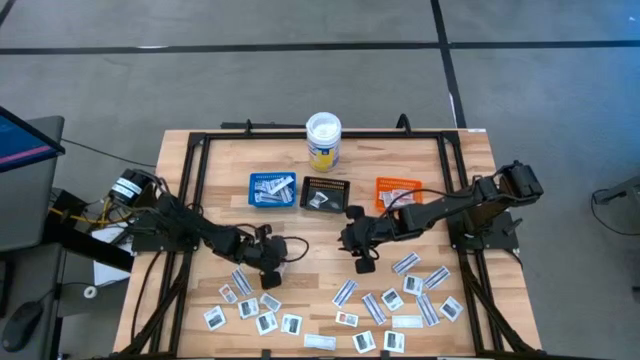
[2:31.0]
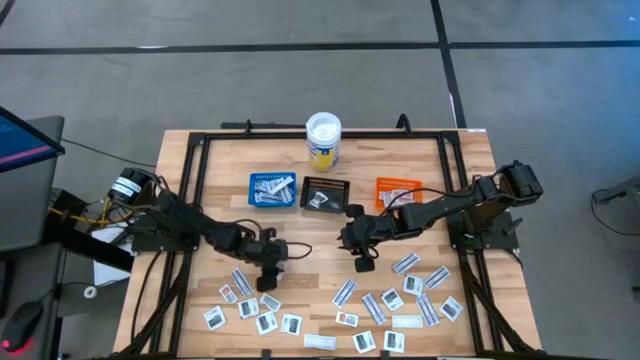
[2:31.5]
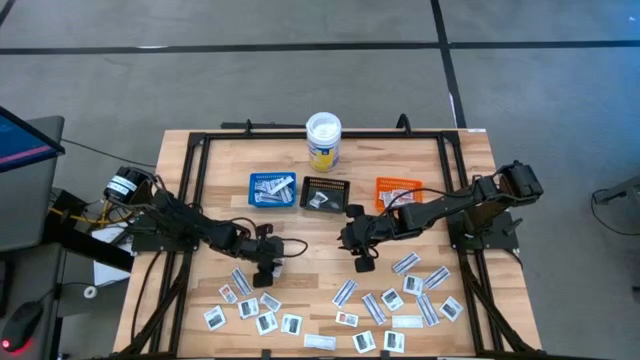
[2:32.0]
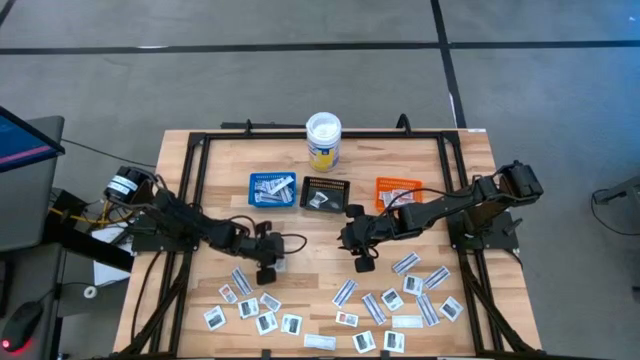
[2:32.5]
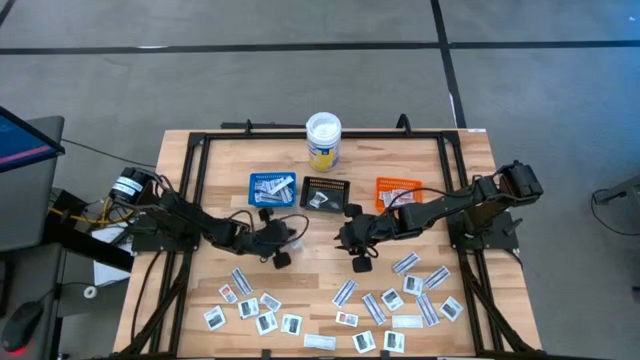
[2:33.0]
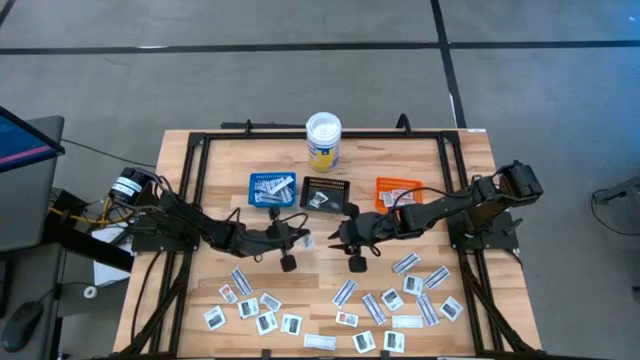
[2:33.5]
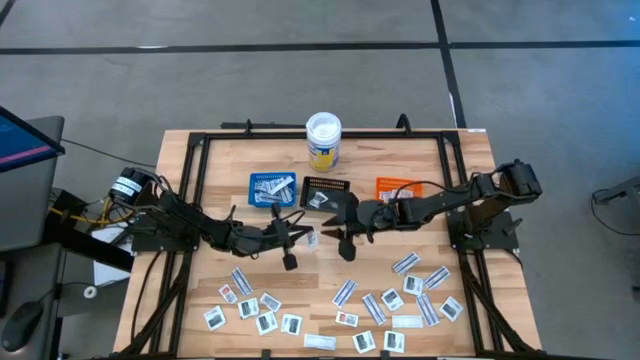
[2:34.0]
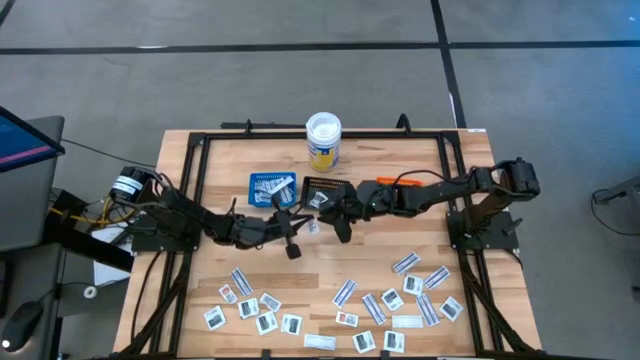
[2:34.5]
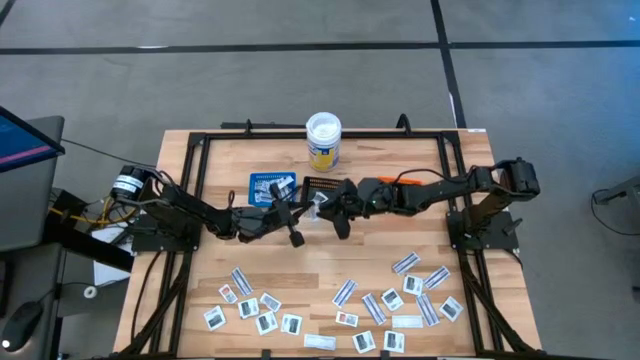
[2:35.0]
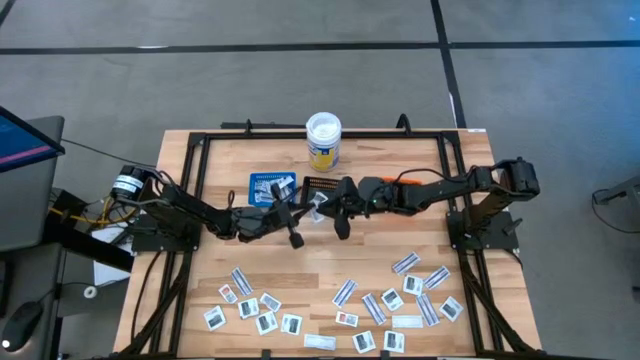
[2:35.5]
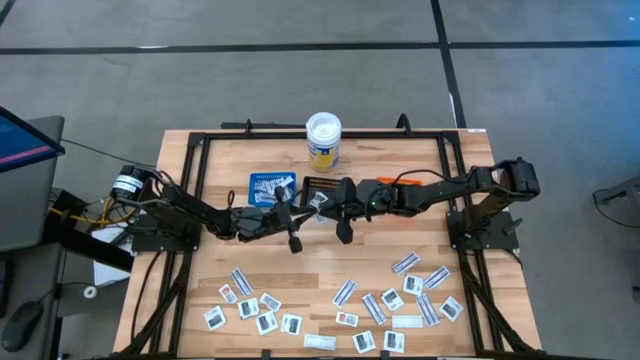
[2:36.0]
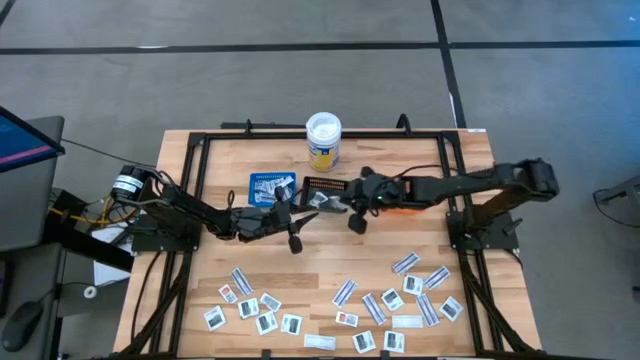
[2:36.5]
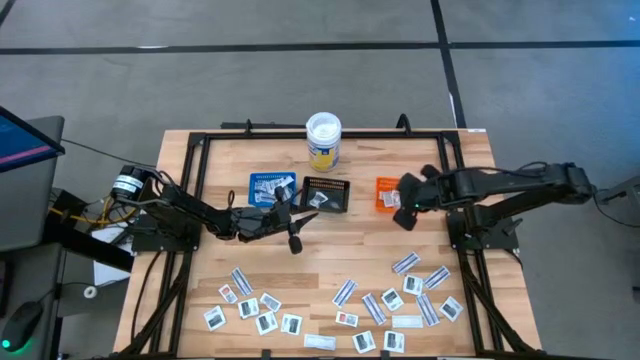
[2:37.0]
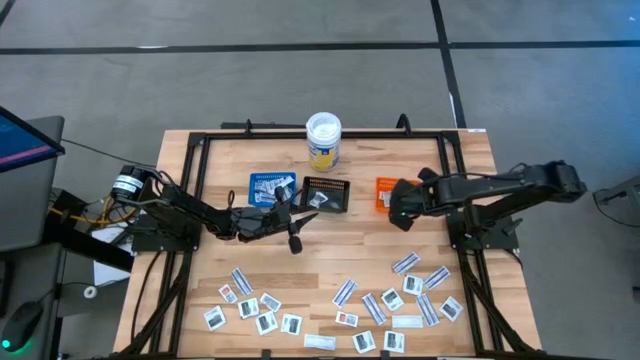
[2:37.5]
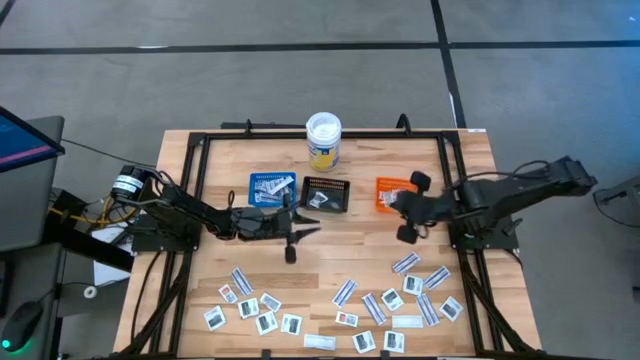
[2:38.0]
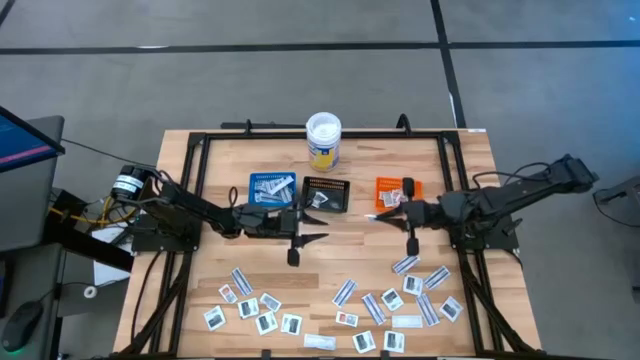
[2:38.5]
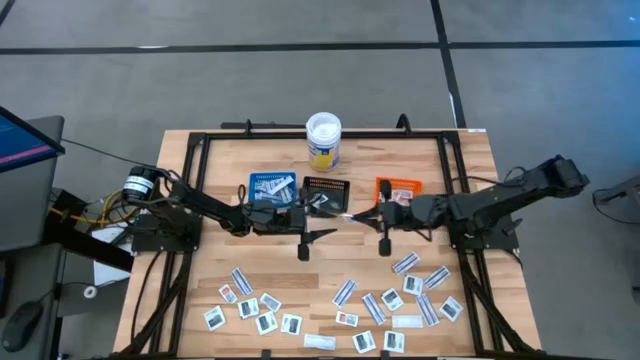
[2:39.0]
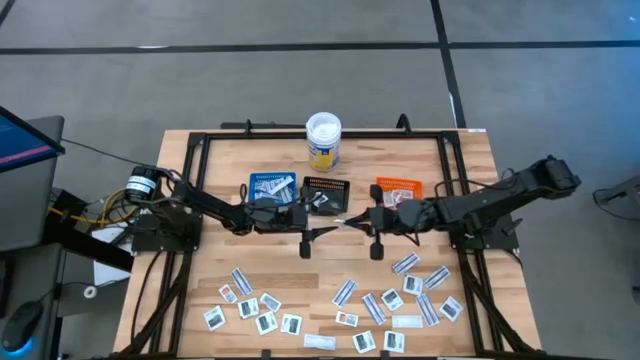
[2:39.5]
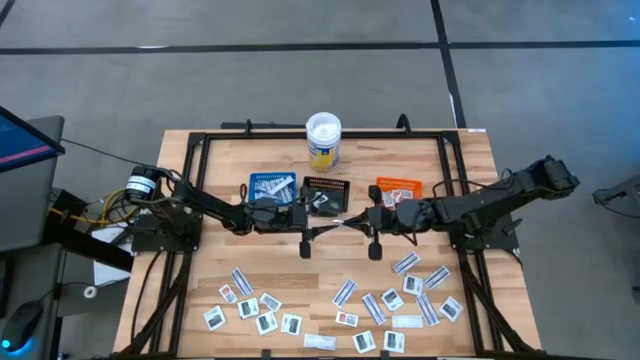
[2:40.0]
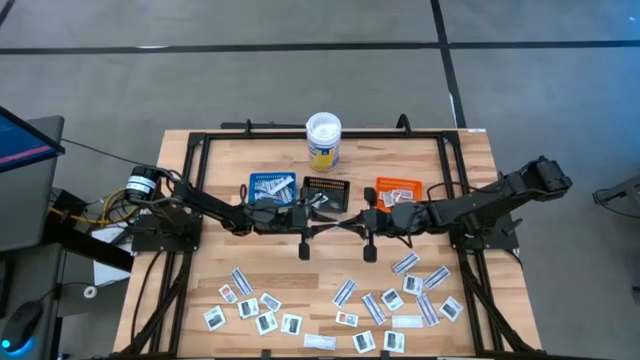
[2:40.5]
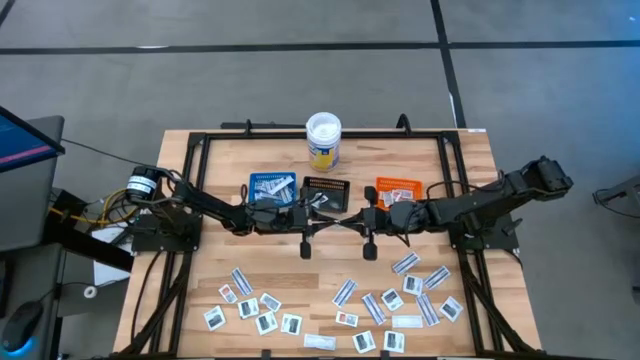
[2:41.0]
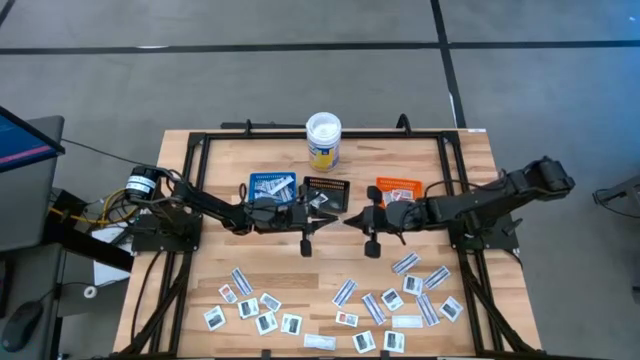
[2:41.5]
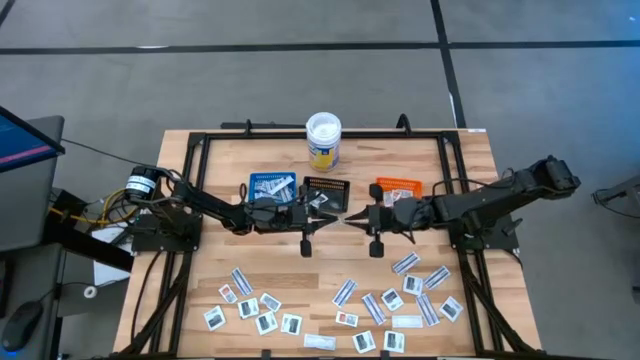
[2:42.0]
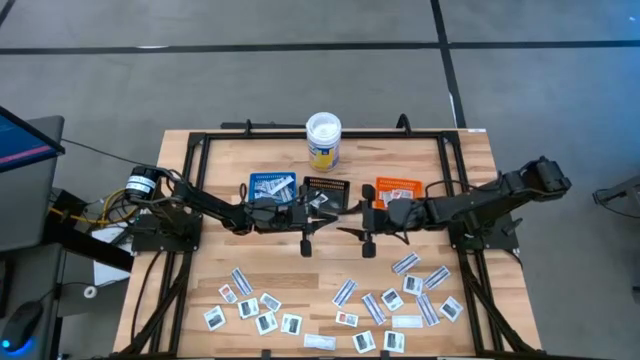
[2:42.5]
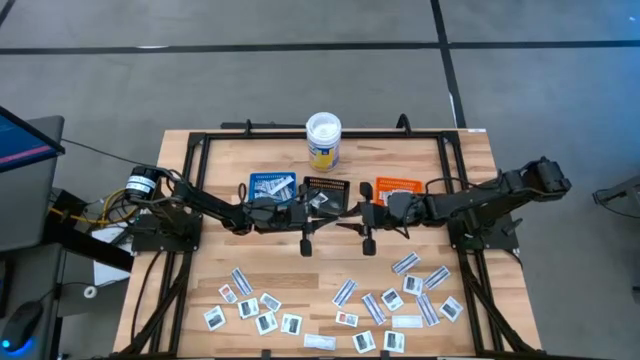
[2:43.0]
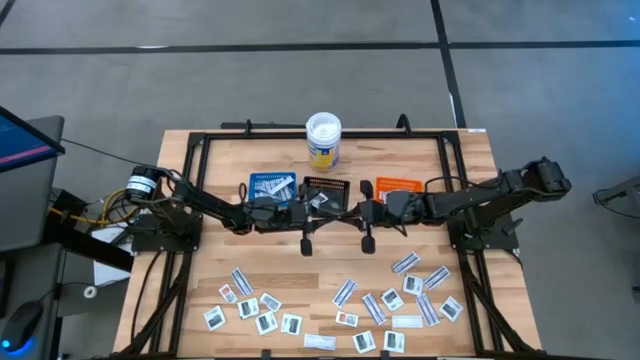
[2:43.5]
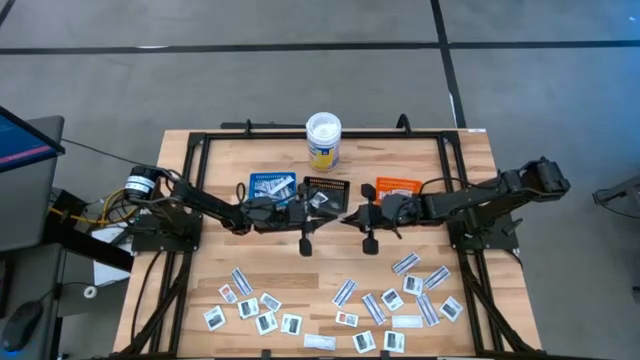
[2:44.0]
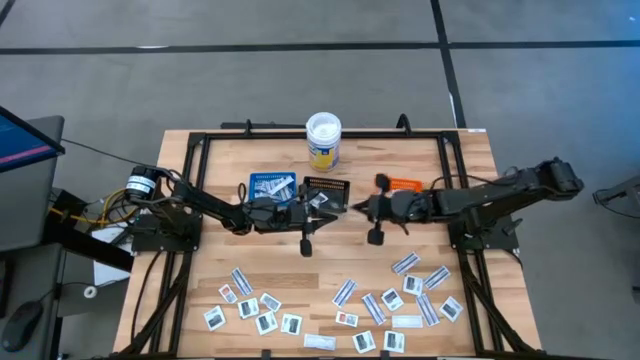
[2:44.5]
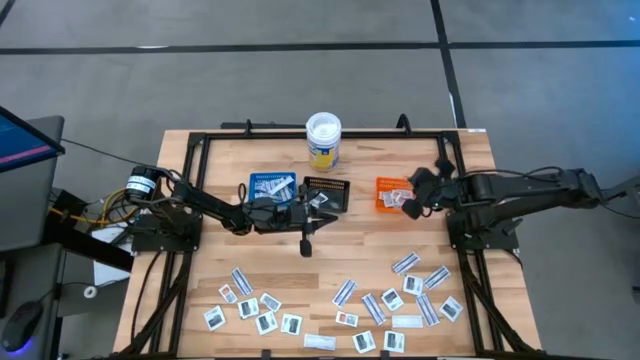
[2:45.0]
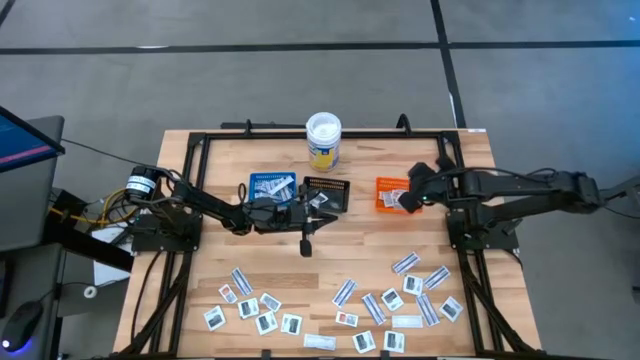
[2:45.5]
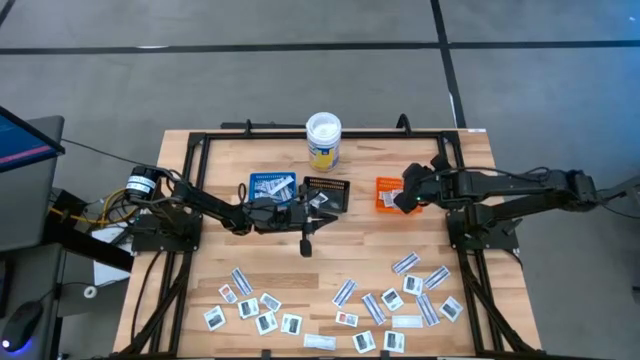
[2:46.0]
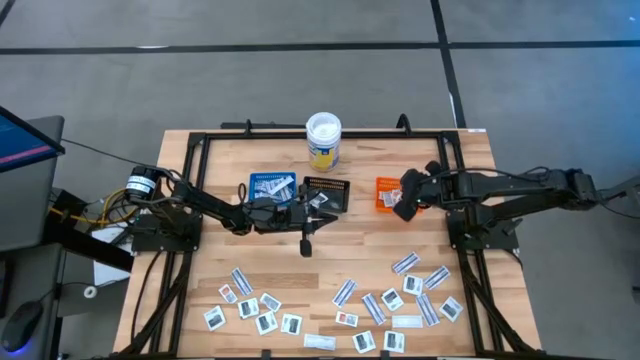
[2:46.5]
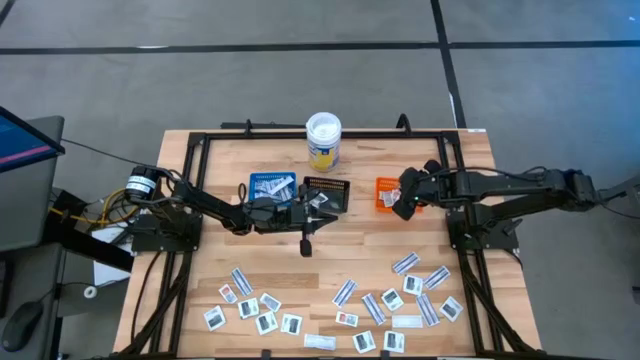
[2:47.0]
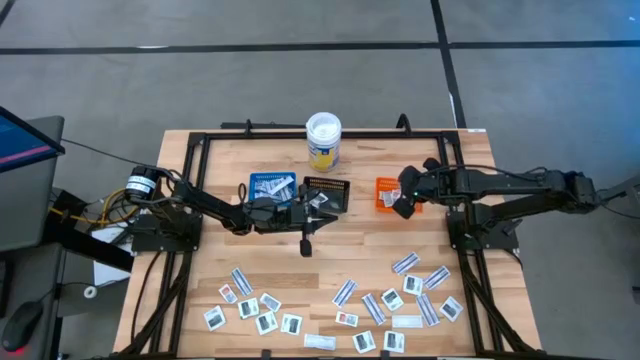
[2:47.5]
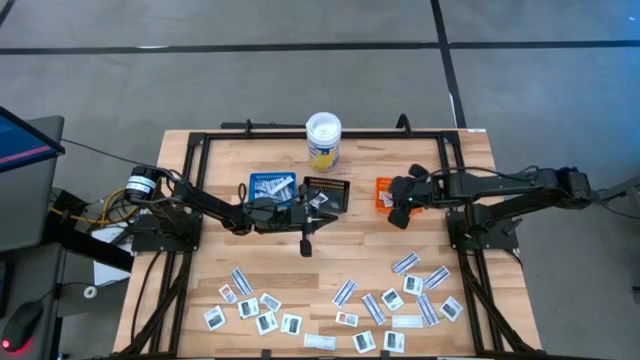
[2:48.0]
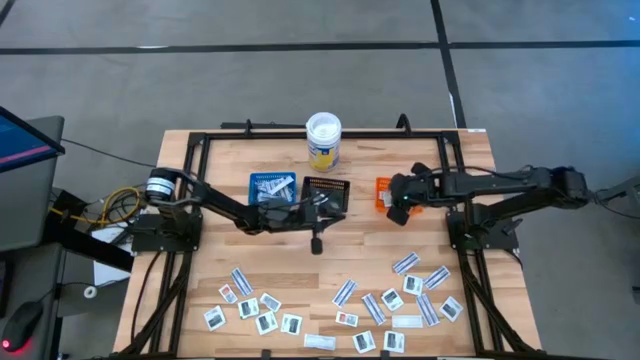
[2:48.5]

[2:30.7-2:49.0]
Task: Pick & Place First Aid Supplies
Put the orange ointment pack into the orange bin

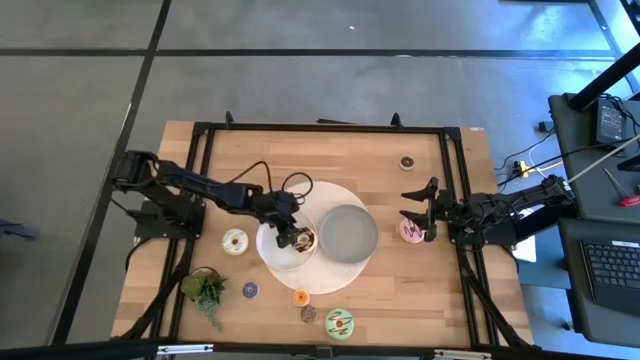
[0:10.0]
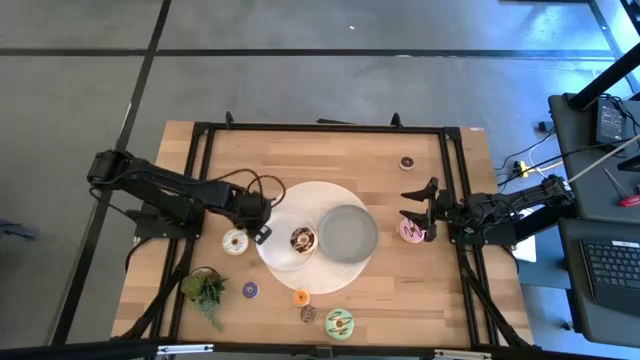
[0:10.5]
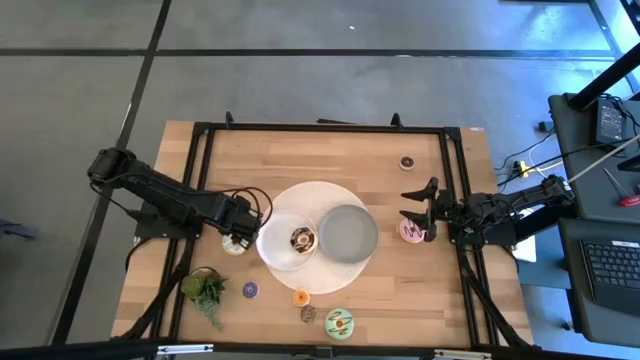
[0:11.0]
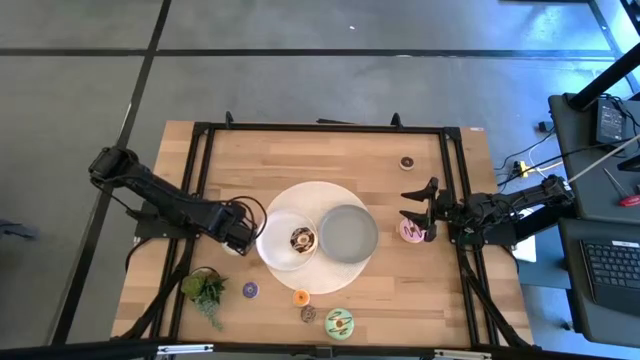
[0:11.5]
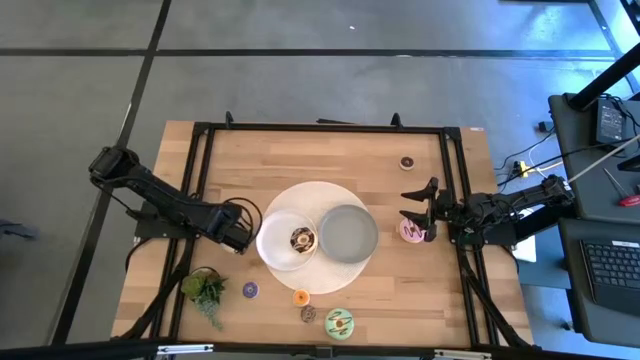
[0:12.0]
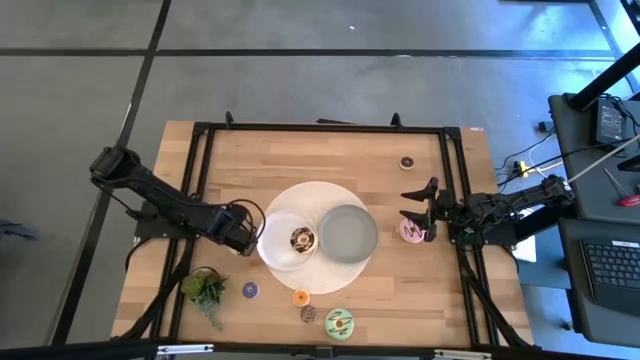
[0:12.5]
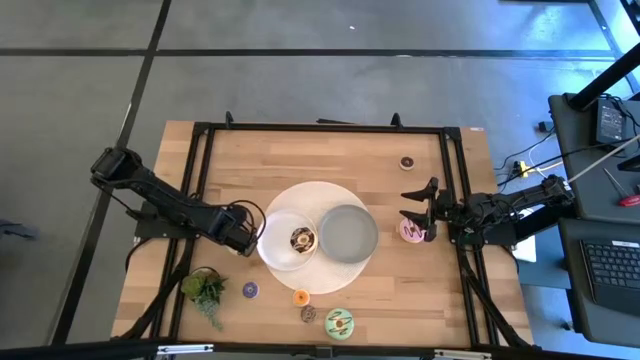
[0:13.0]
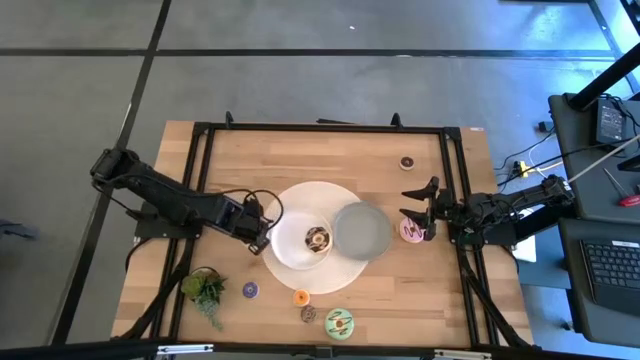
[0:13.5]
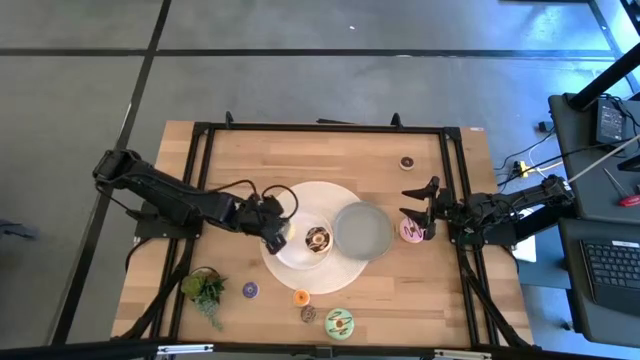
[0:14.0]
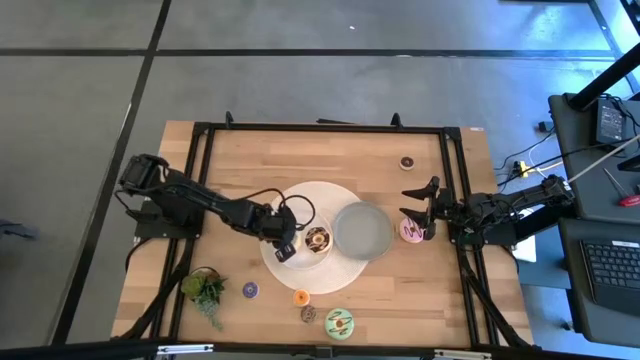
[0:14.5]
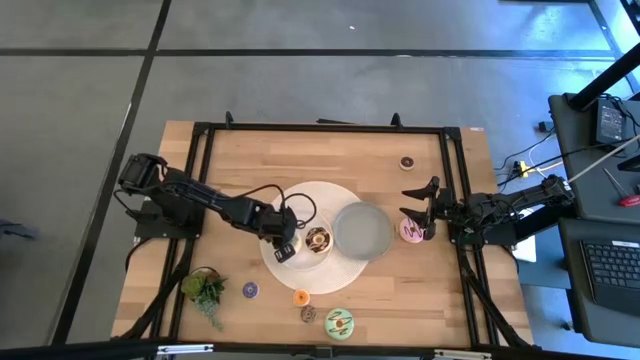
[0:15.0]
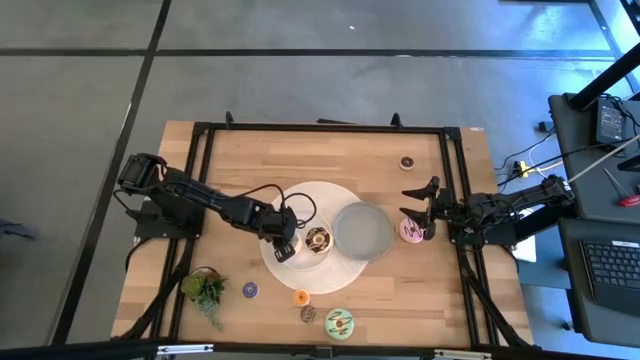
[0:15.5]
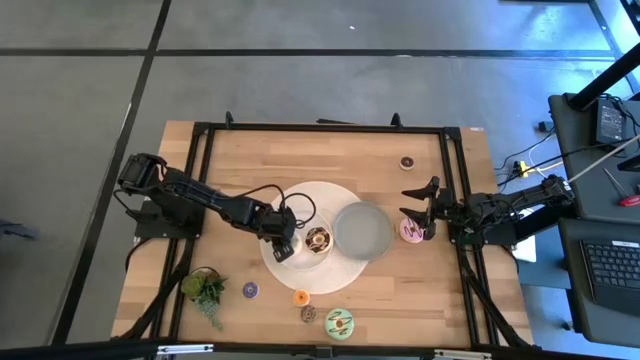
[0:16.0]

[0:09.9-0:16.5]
Task: Pick & Place donuts
Put the big white donut on the white plate
